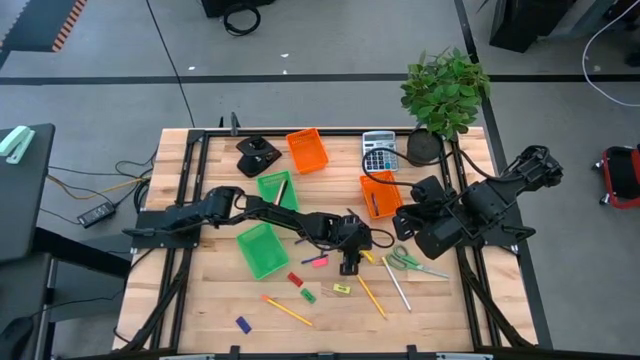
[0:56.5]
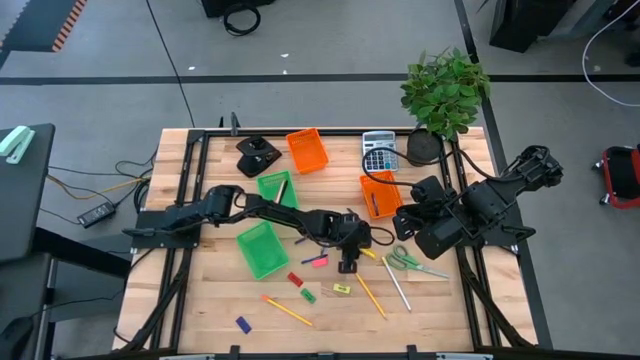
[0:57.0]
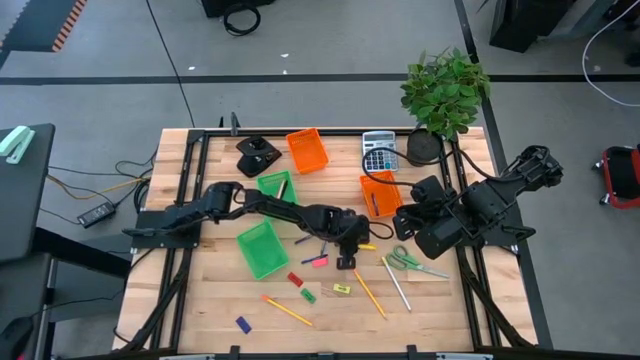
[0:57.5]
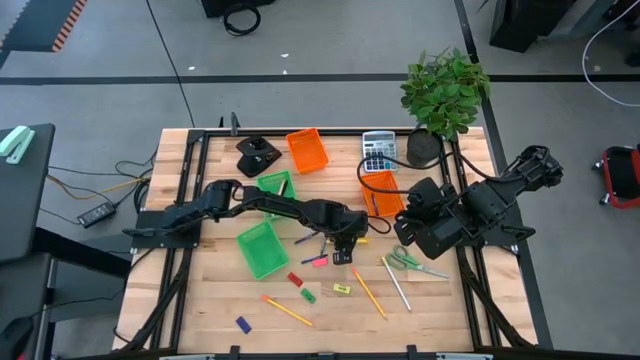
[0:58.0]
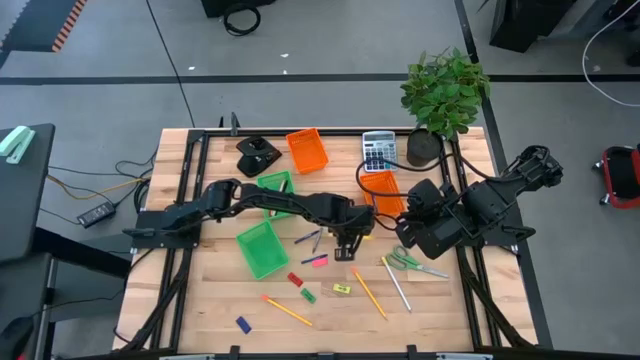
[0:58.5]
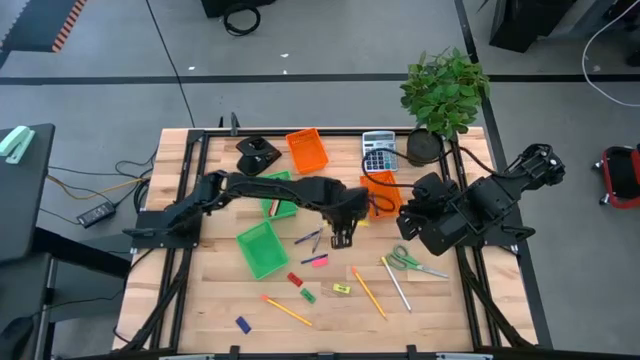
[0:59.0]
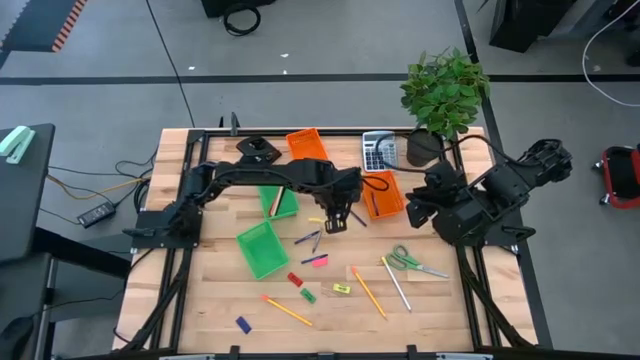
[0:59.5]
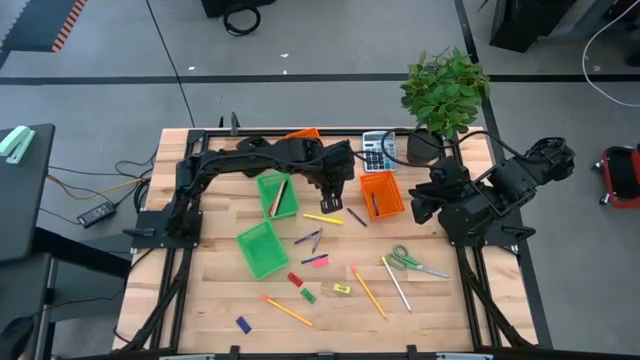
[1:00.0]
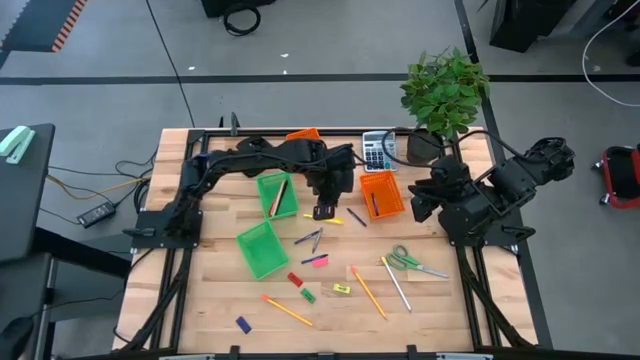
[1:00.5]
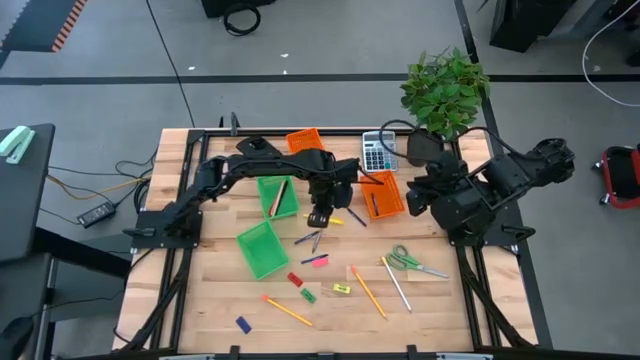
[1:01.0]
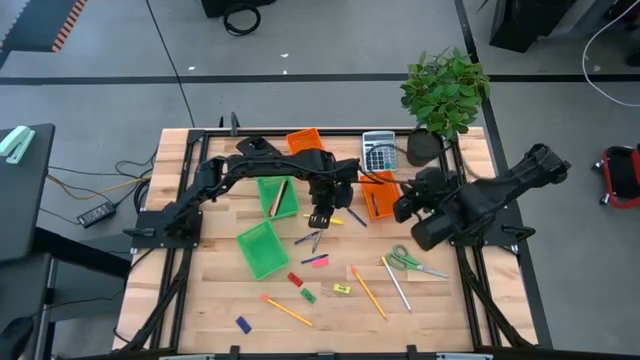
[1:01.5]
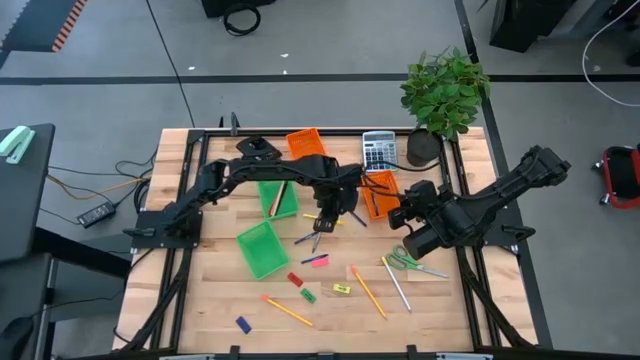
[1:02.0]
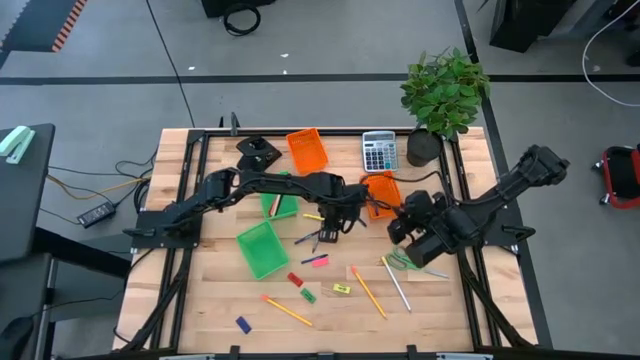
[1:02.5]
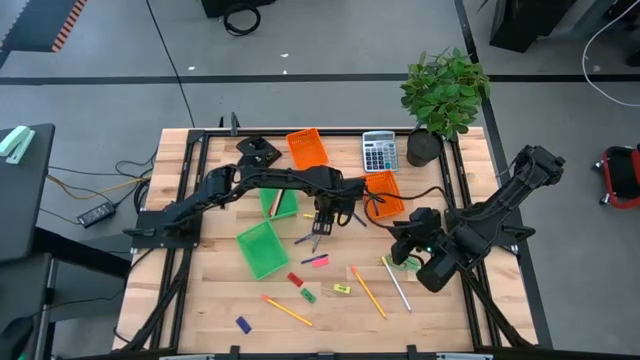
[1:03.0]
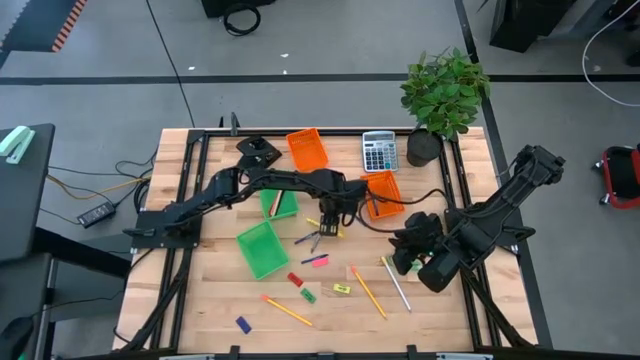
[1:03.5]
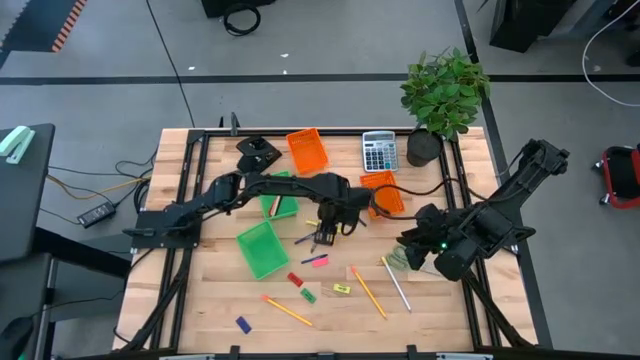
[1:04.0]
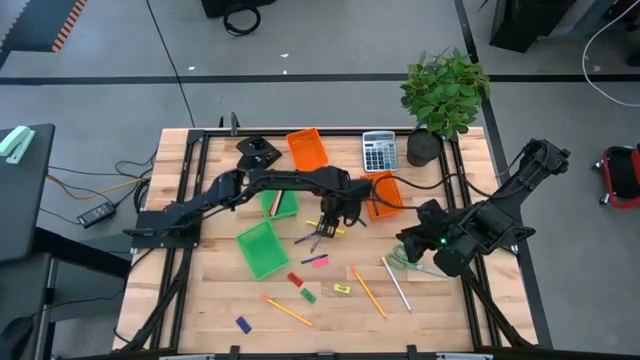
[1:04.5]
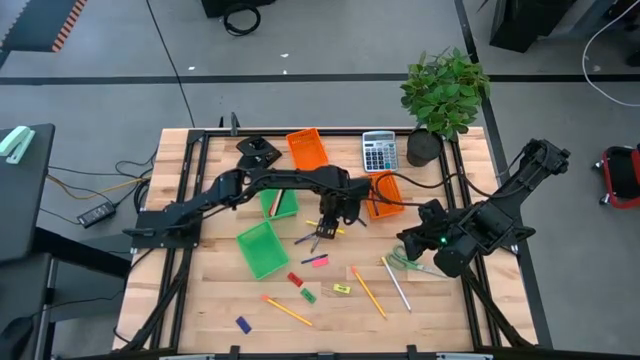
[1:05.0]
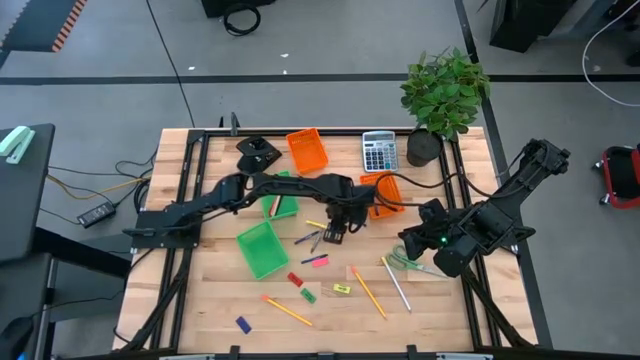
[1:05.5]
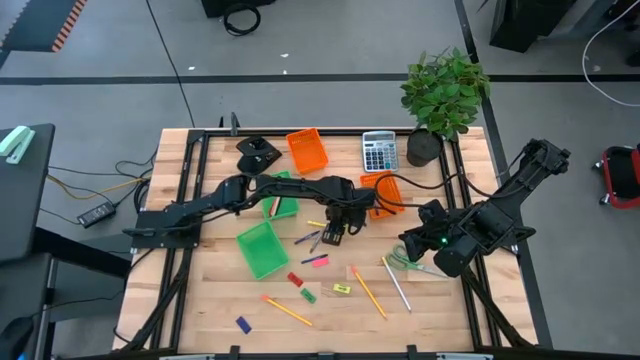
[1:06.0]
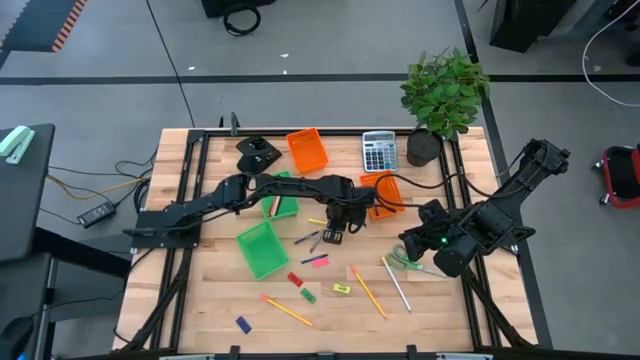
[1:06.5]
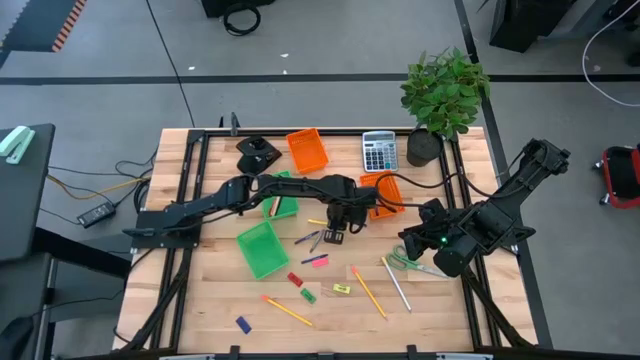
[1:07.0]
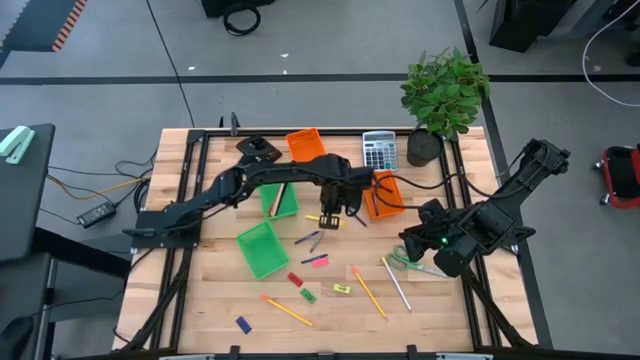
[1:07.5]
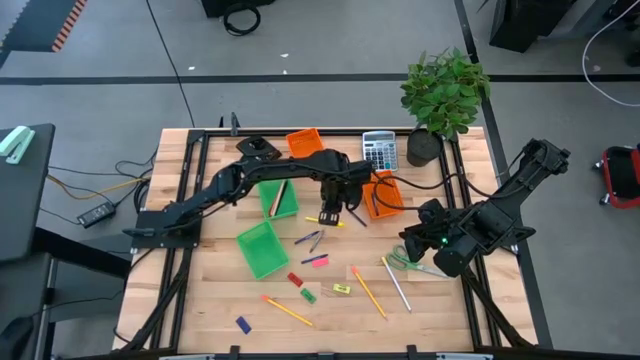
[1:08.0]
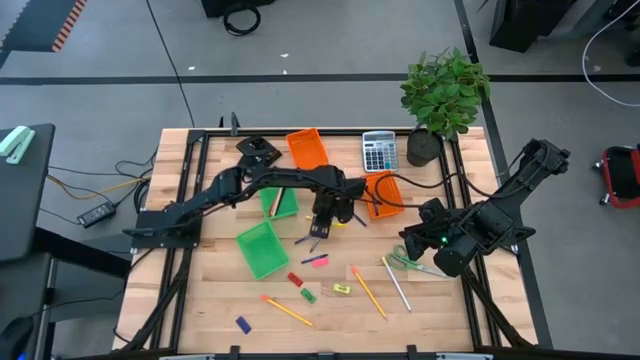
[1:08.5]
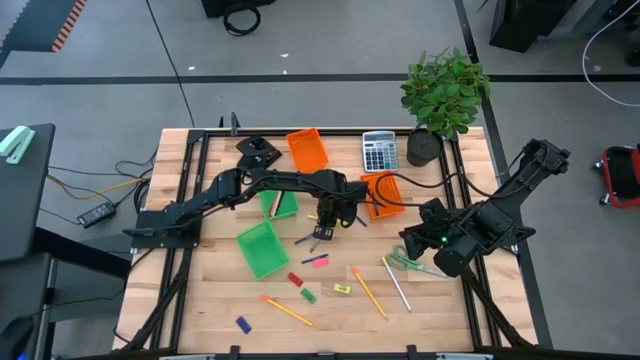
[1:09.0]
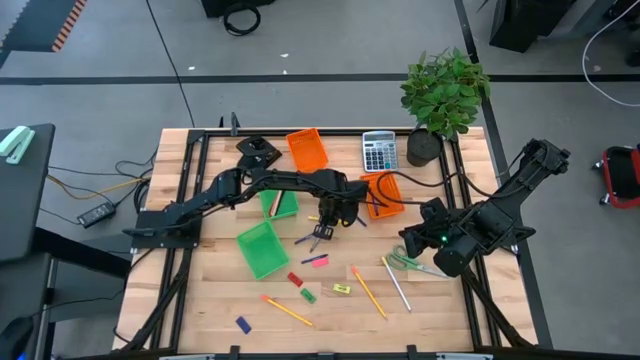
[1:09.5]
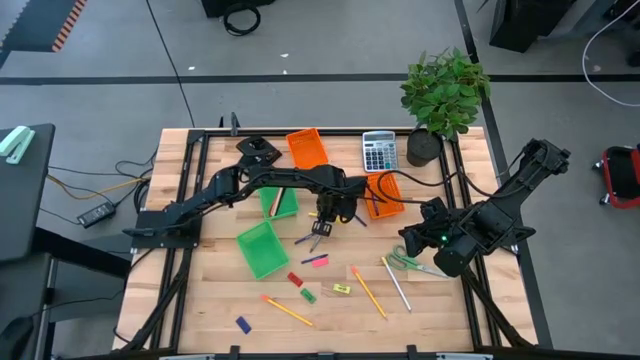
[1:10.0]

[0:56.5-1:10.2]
Task: Sort crayons/erasers/pens/pencils in bins
Put the yellow pen into the top green bin

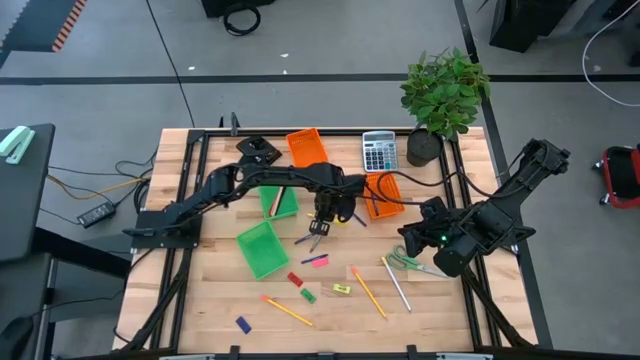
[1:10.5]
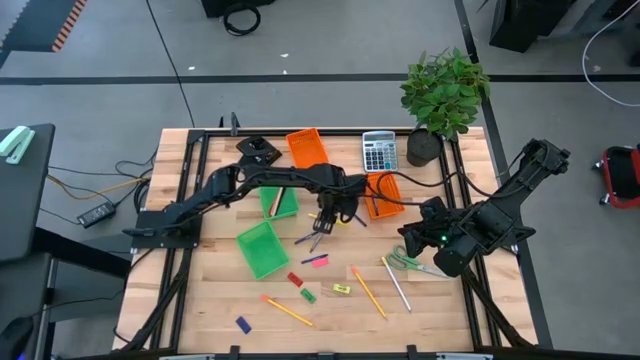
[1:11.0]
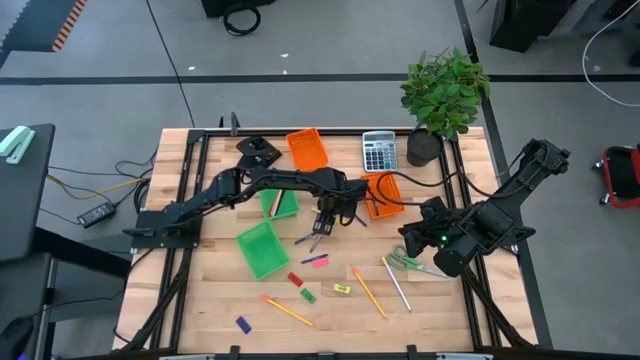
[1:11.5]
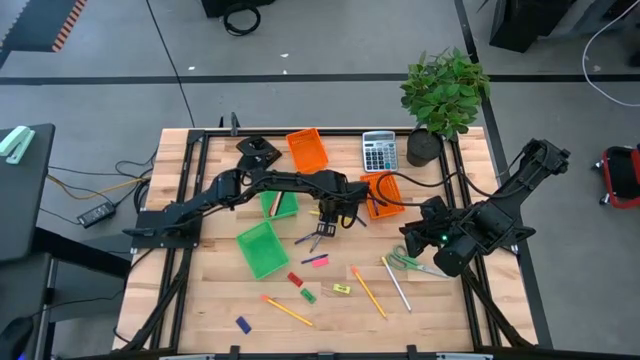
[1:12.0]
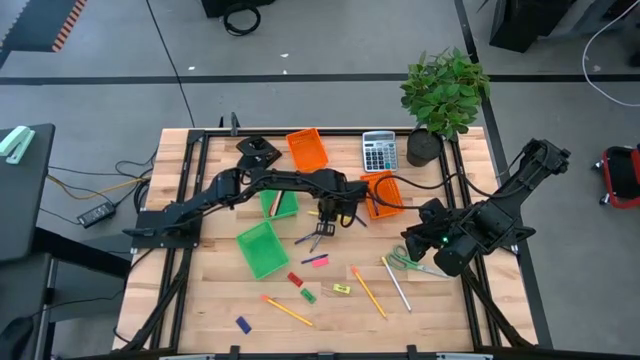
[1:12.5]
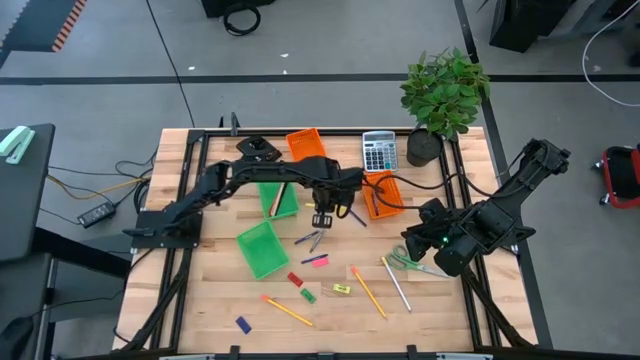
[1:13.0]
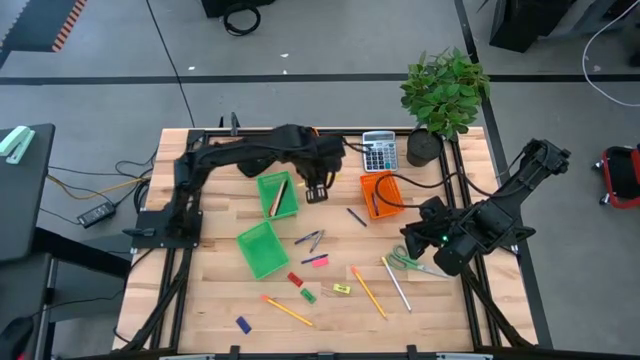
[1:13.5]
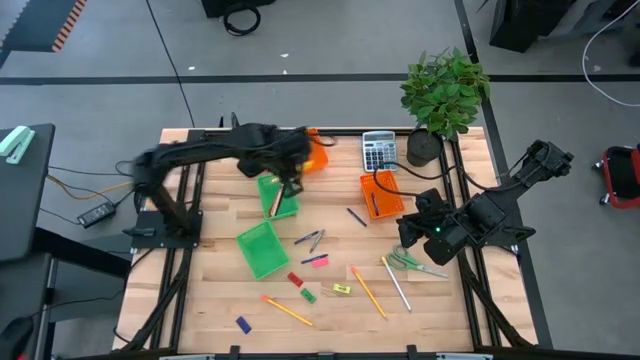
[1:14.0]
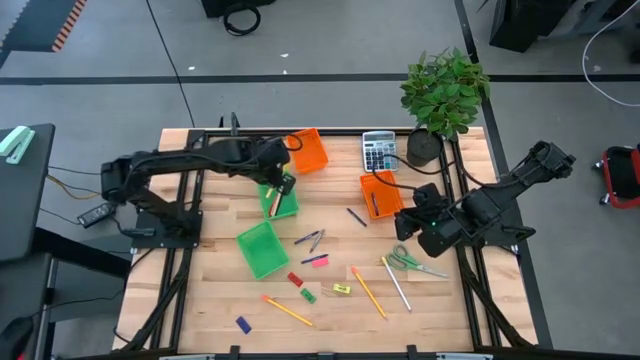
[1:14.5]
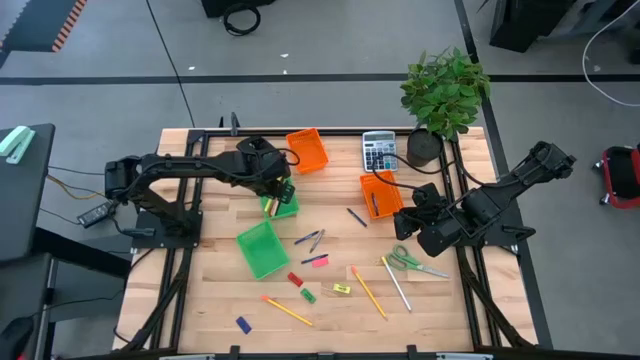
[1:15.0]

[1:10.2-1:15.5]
Put the yellow pen into the top green bin

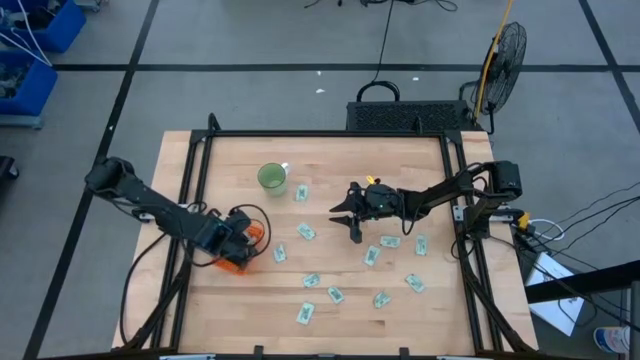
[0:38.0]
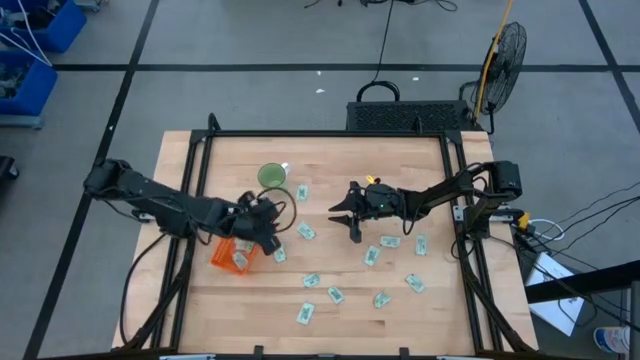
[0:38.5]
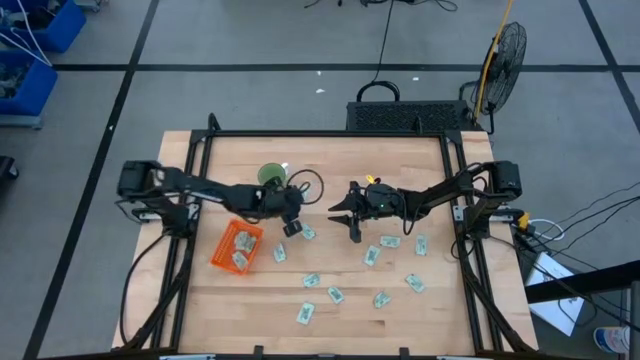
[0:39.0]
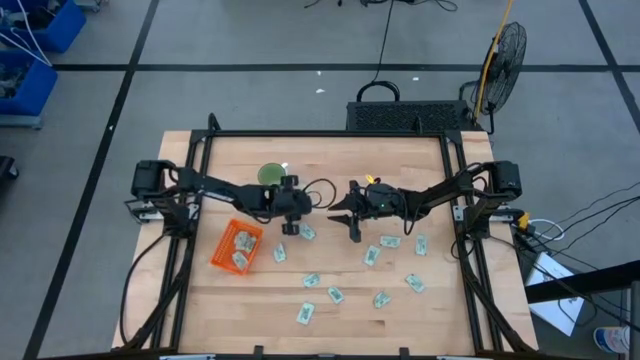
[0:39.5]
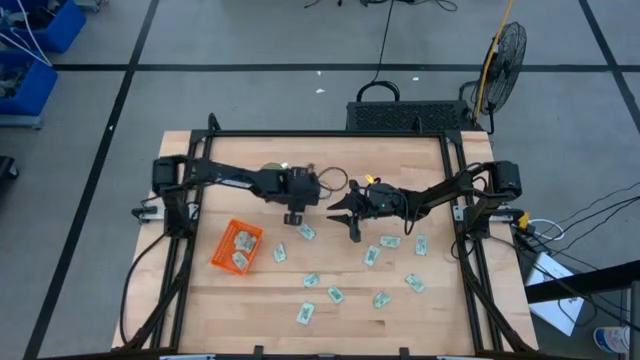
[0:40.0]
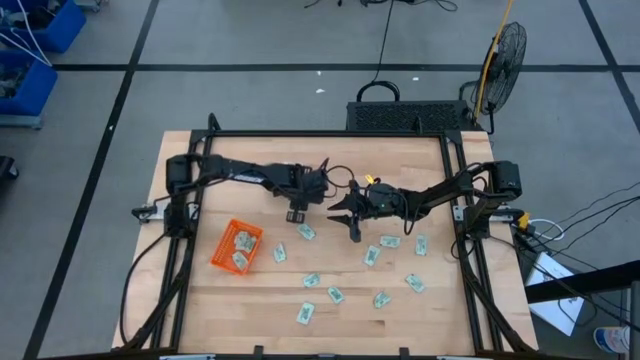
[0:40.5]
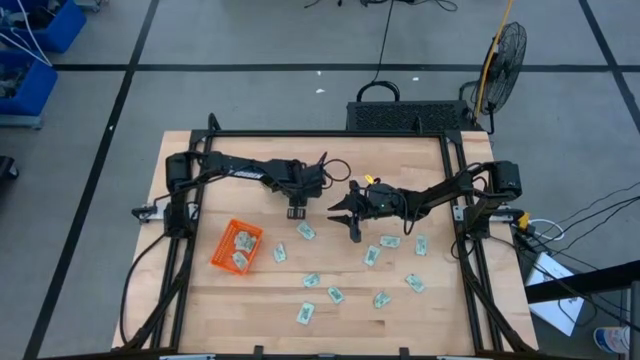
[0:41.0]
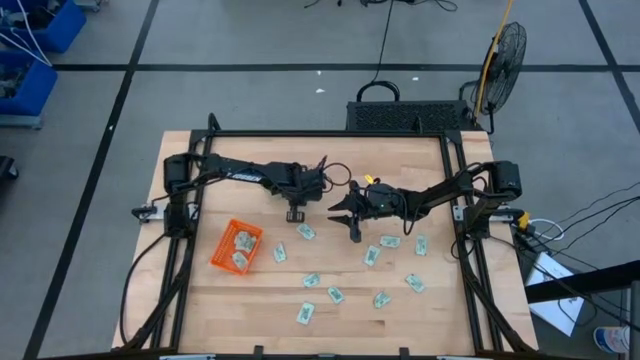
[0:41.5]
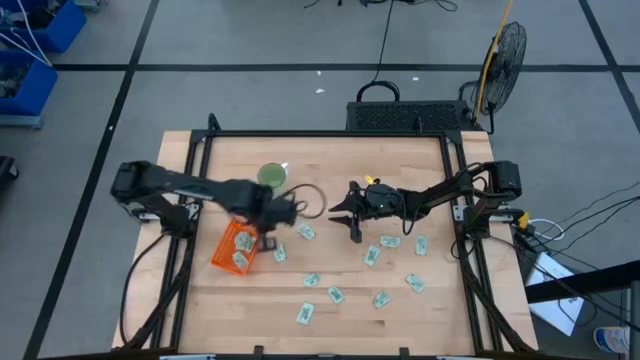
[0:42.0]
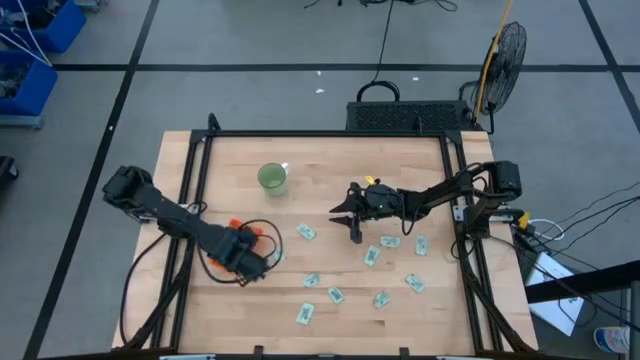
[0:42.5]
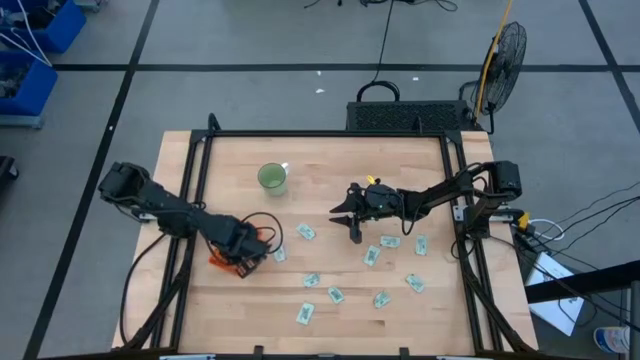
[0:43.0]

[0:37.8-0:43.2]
Task: Pick and place Stevia / Truvia into bins
Put the stevia packet into the orange bin
